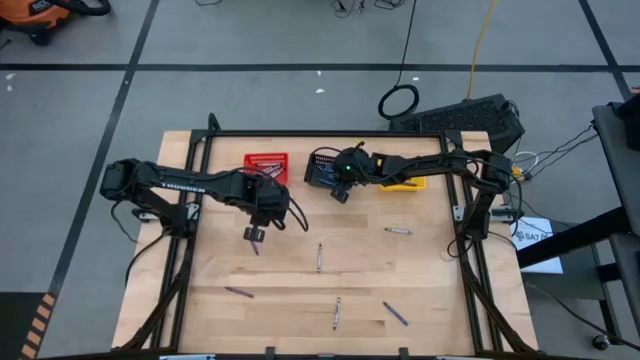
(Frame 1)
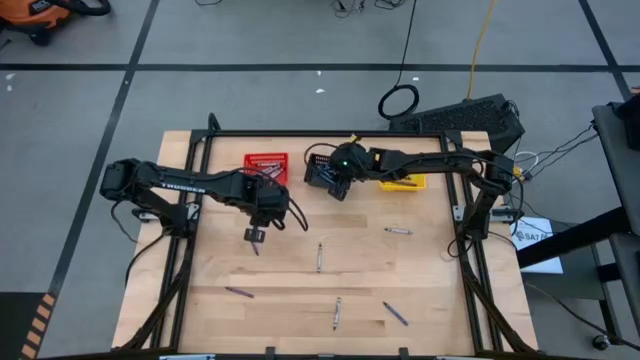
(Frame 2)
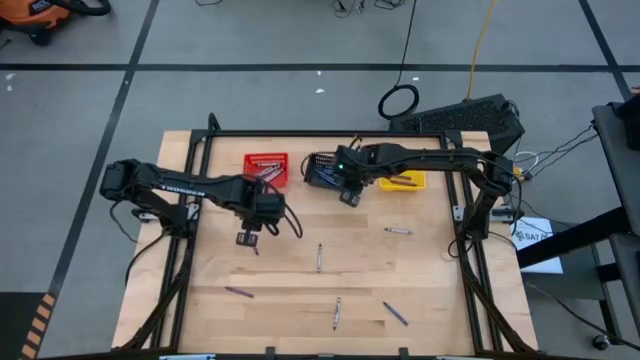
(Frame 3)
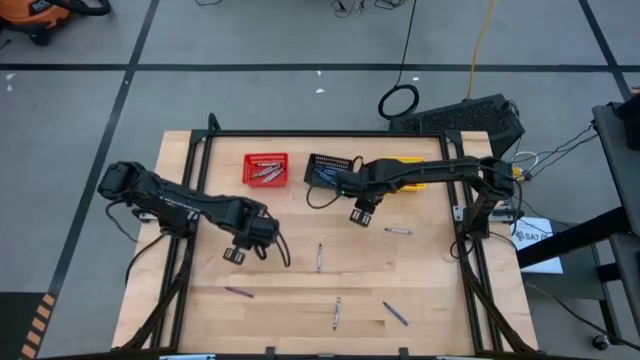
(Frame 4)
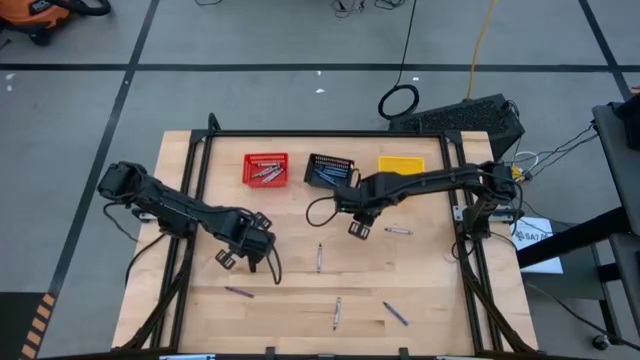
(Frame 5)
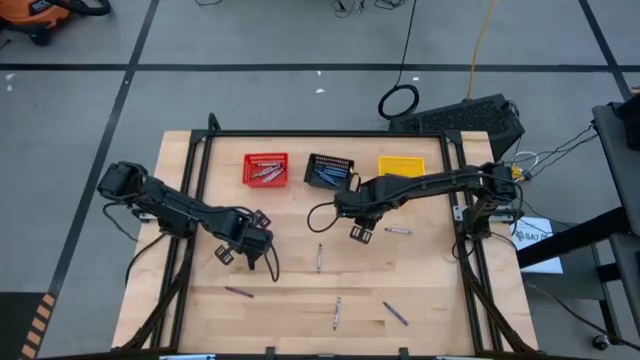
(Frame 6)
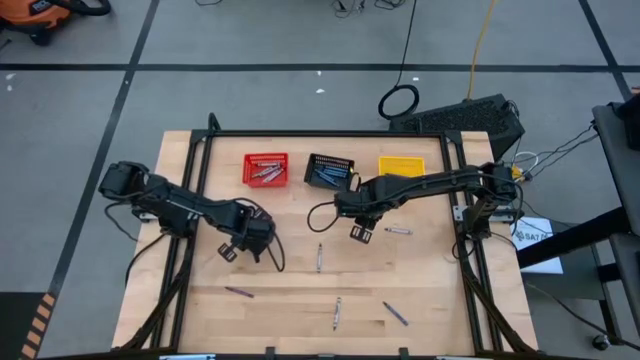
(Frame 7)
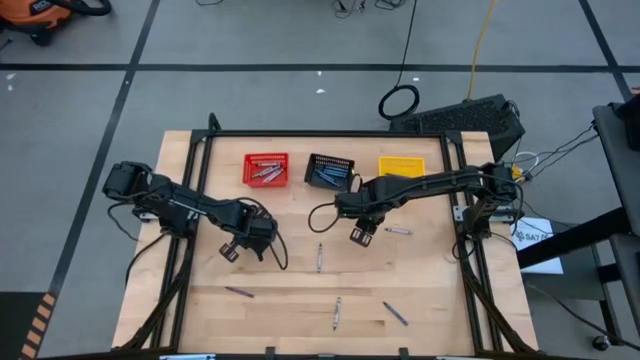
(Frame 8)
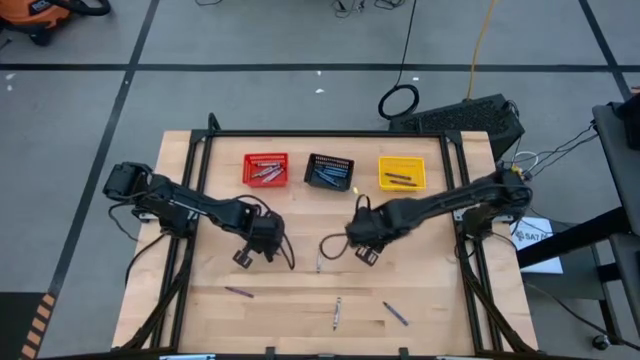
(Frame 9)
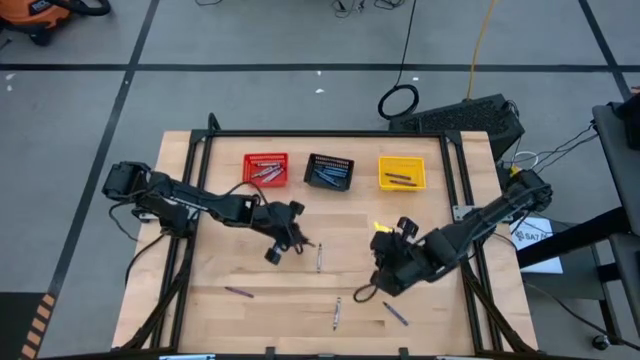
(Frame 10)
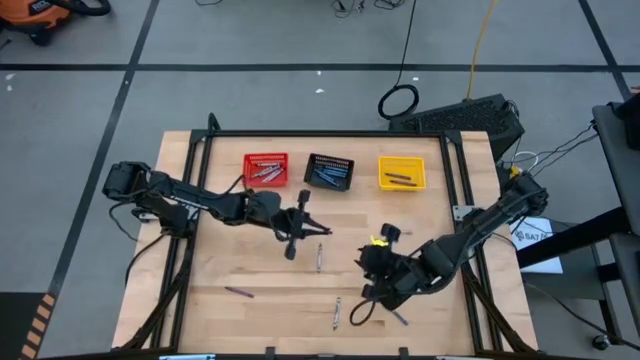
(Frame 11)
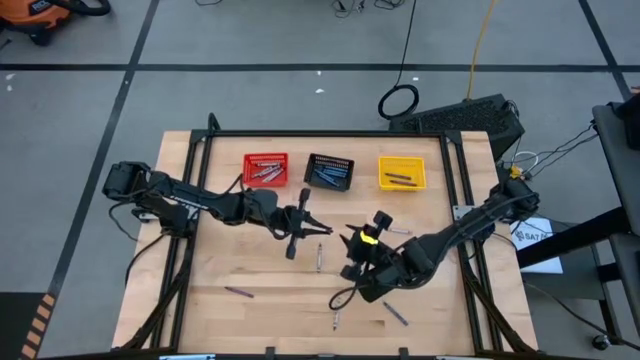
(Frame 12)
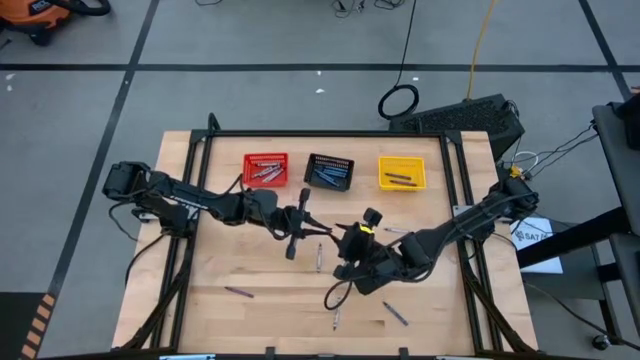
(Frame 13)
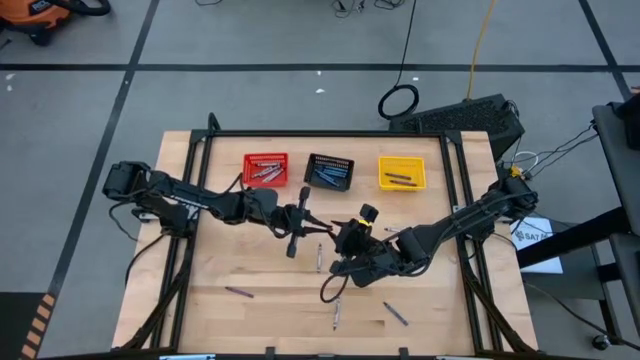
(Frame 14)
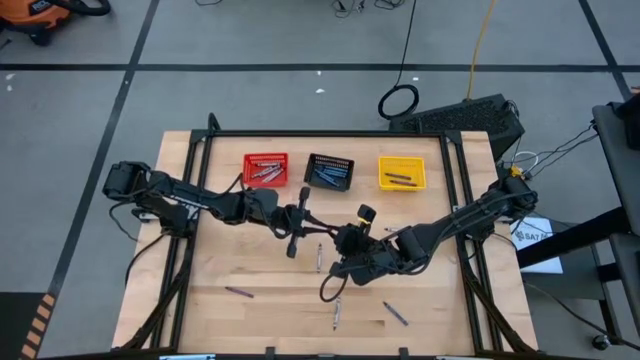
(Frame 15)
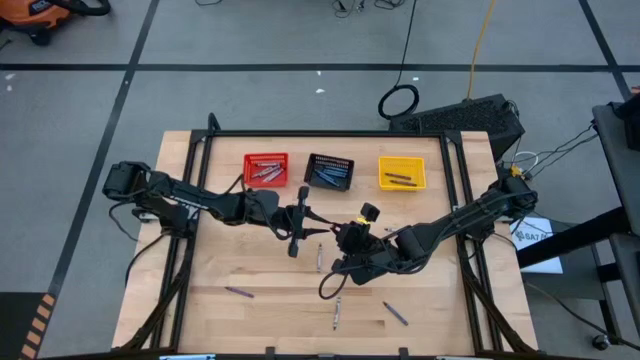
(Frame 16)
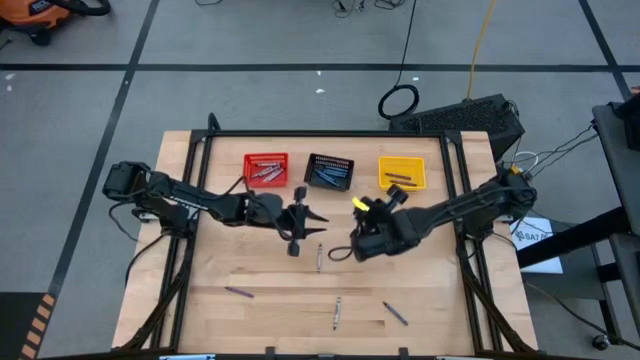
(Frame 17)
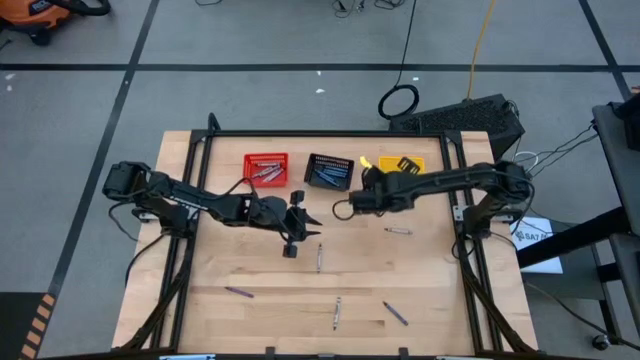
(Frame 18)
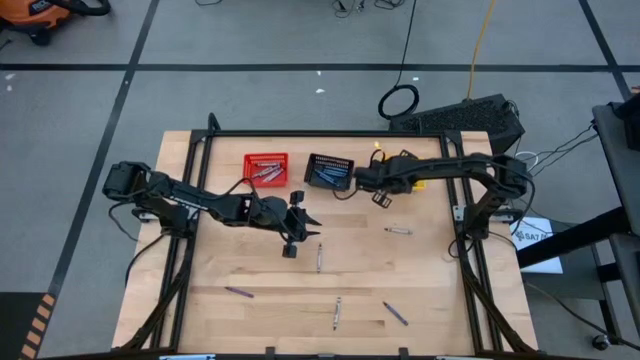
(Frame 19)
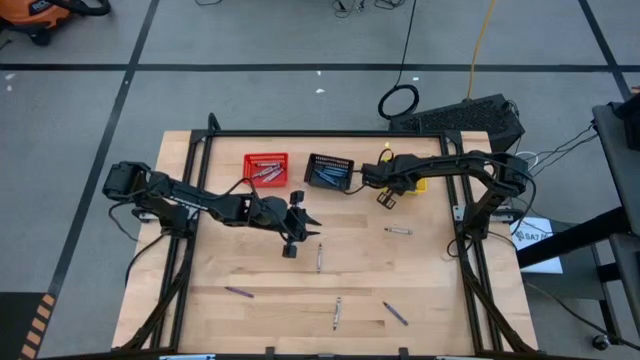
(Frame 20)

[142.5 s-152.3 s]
Task: Sort crayons
Put the violet crayon into the yellow bin

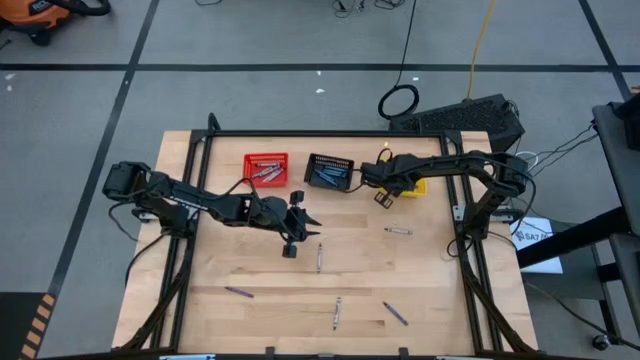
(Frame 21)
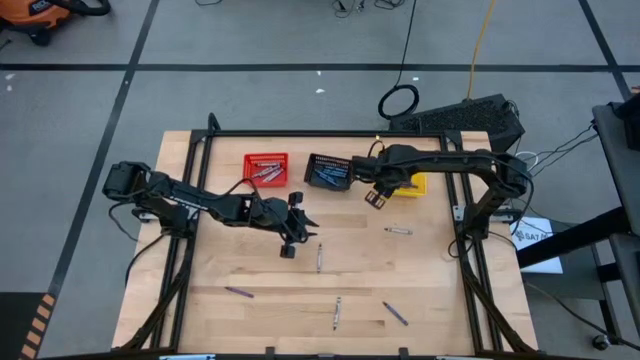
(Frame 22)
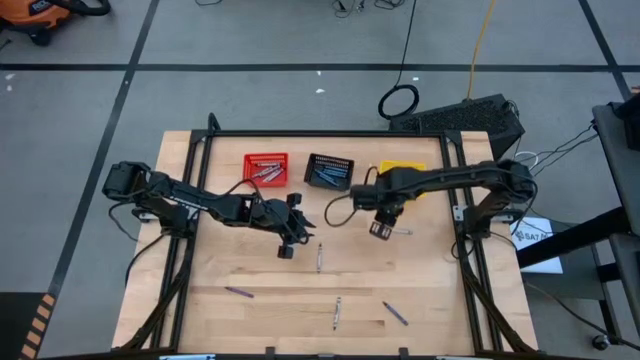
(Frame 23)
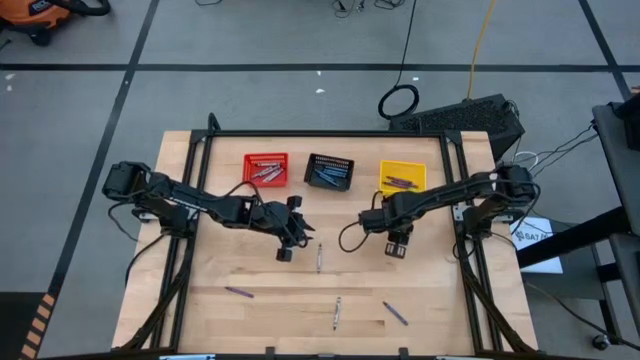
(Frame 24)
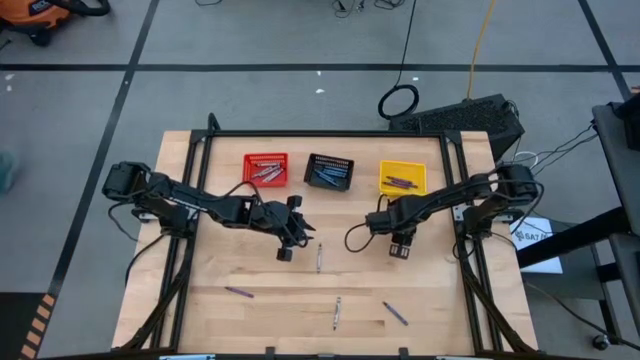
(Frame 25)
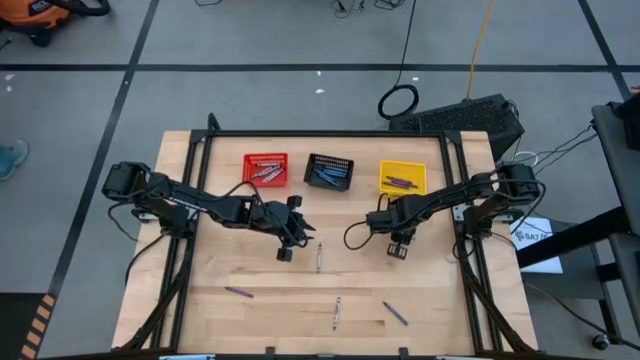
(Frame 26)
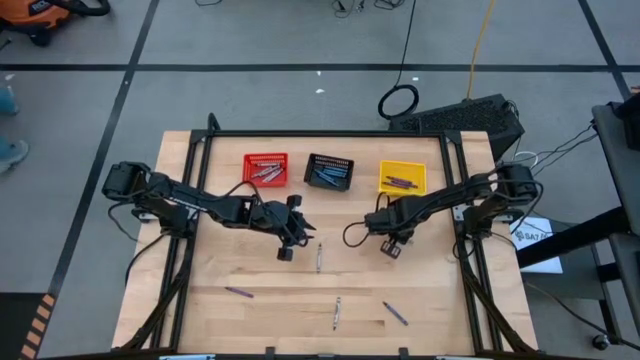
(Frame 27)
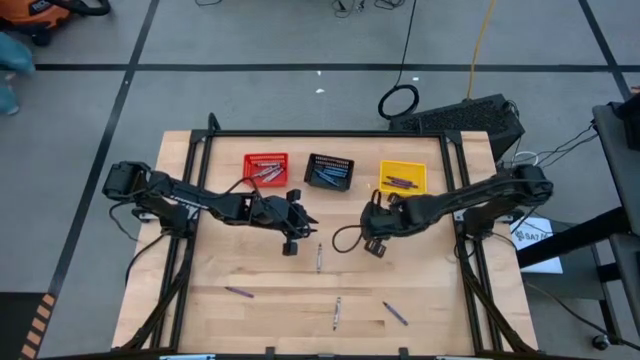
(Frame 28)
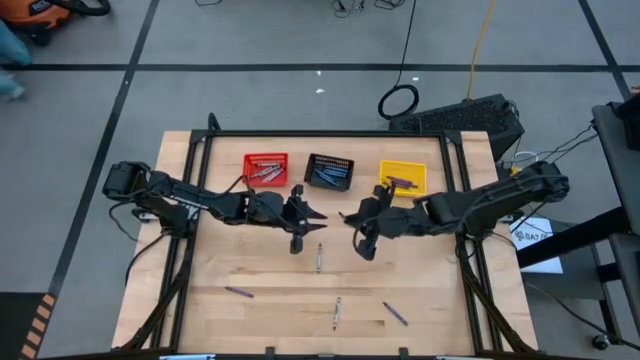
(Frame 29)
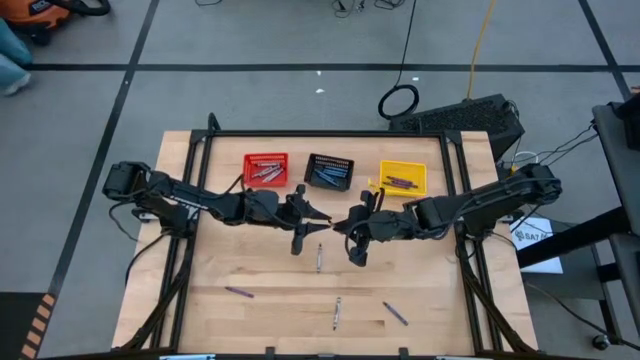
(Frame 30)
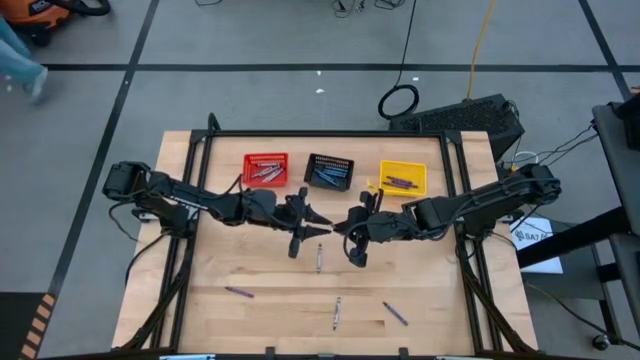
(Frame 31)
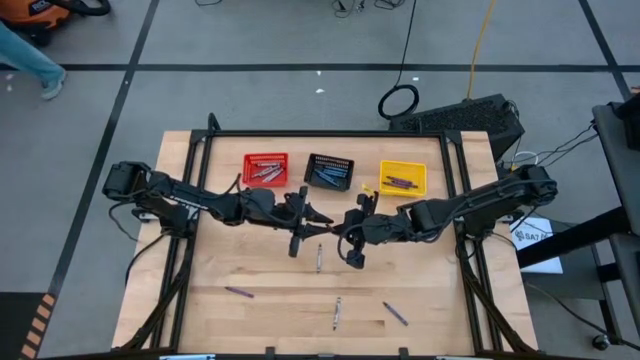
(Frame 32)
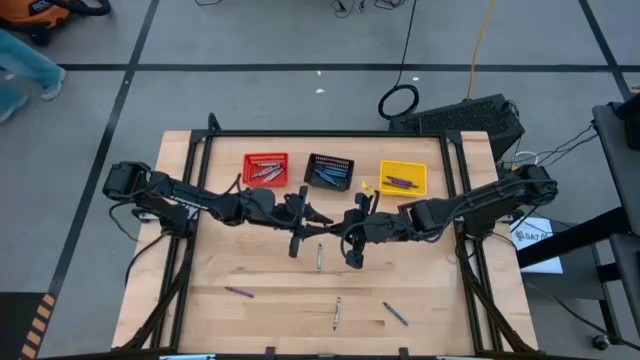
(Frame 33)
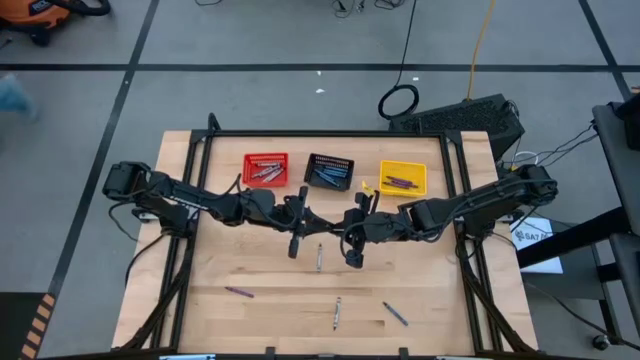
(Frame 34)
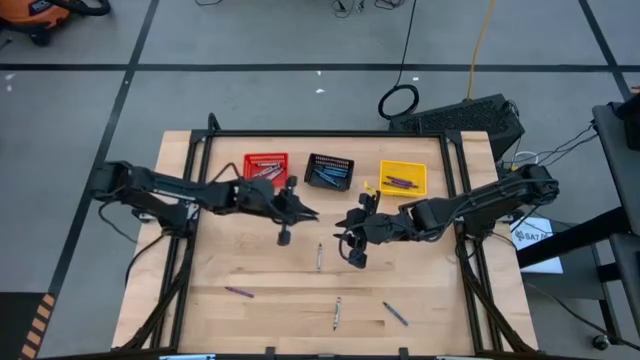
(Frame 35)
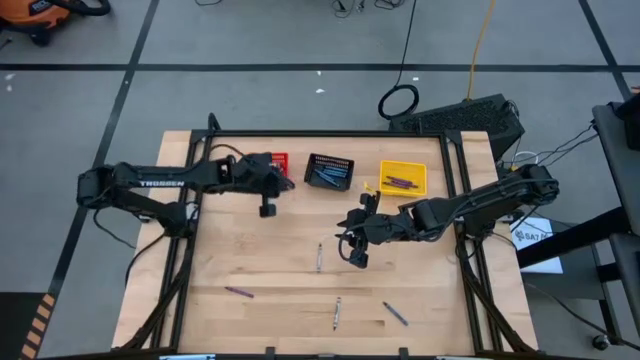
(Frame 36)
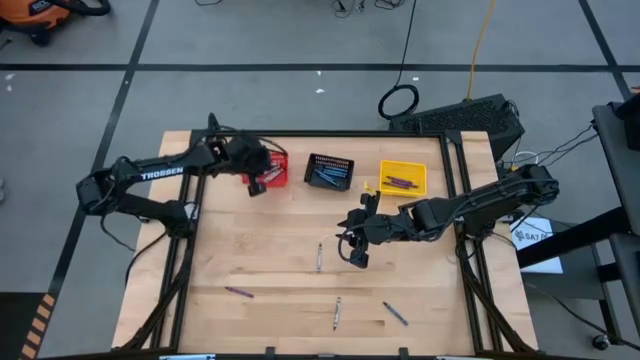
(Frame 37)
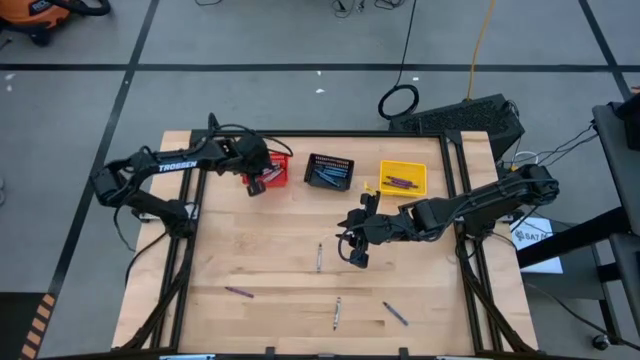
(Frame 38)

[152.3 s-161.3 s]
Put the gray crayon into the red bin

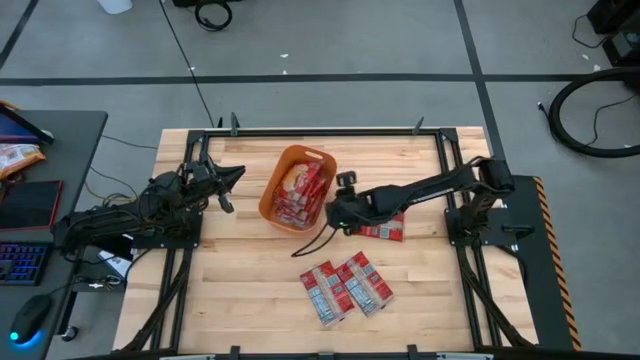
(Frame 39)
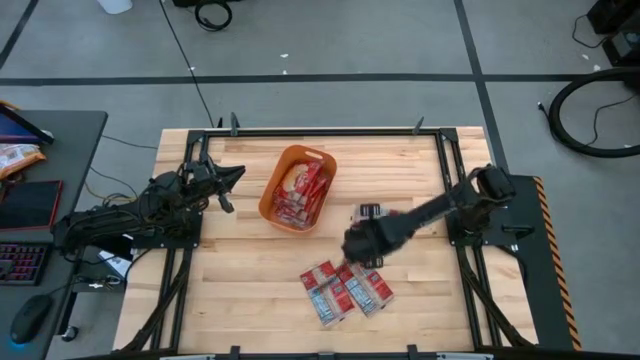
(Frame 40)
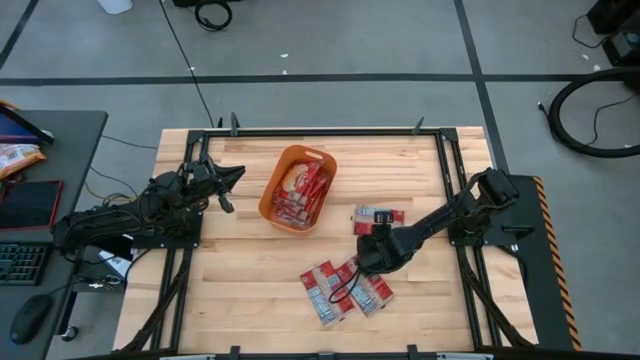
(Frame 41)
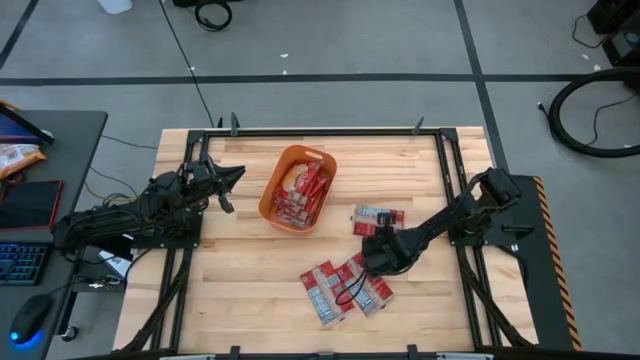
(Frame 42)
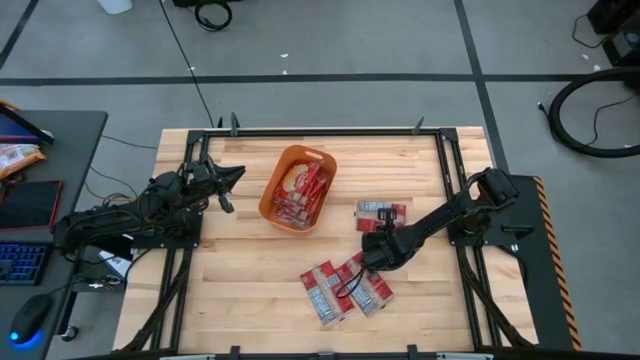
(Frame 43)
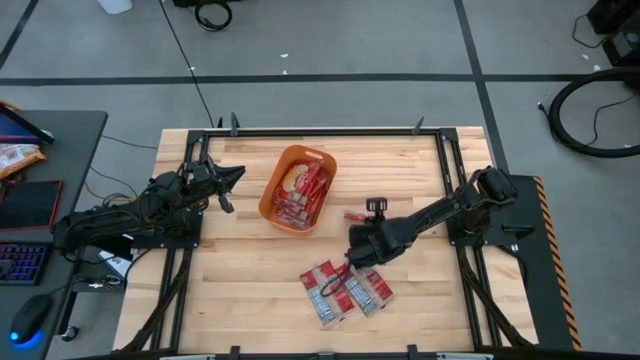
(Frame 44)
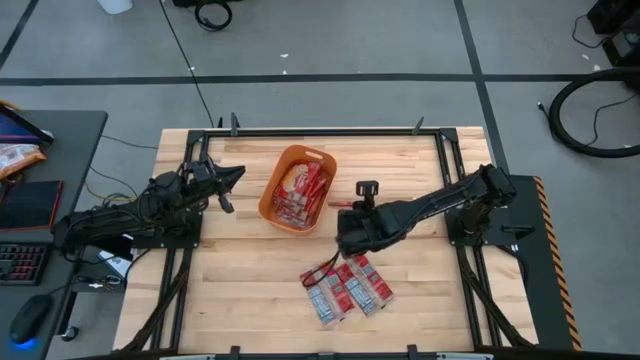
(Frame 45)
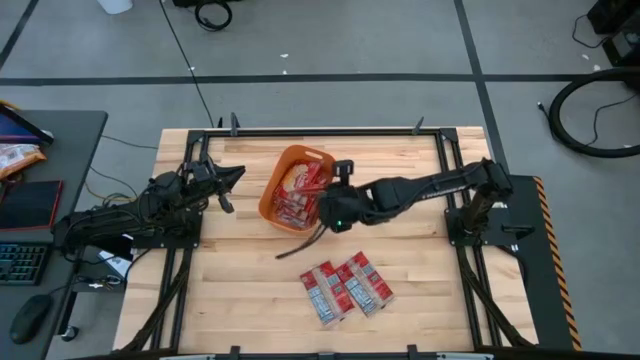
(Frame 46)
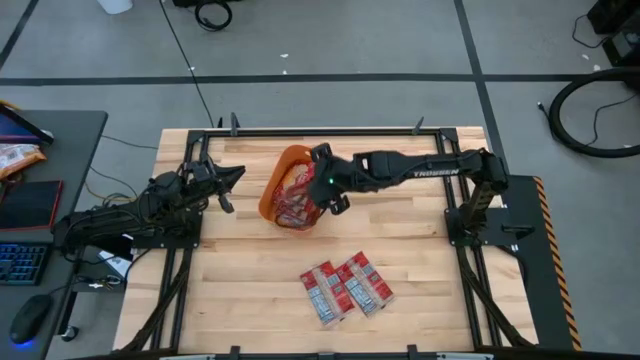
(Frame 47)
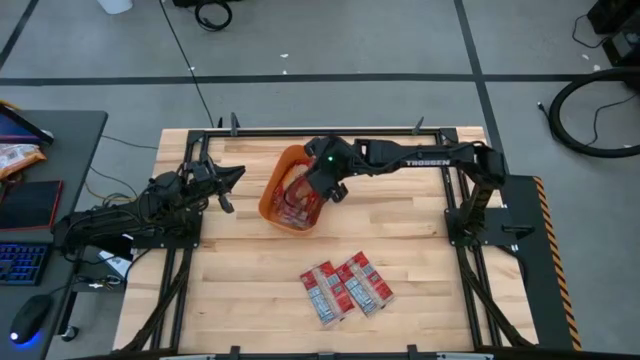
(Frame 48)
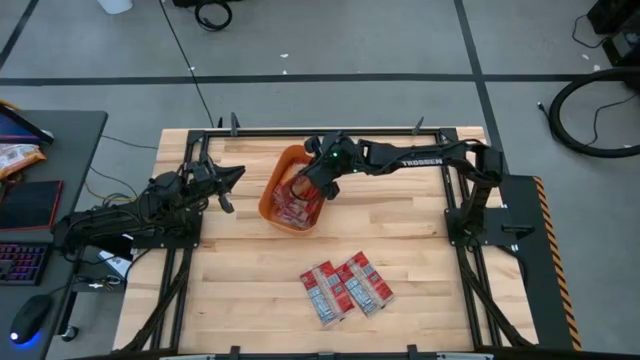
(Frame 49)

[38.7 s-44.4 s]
Task: Sort popcorn bags into baskets
Put the red popcorn pack into the orange bin
